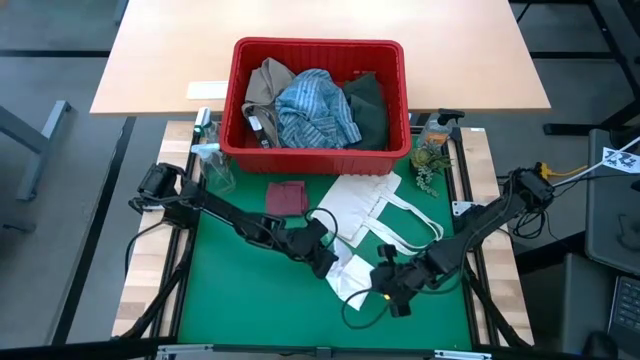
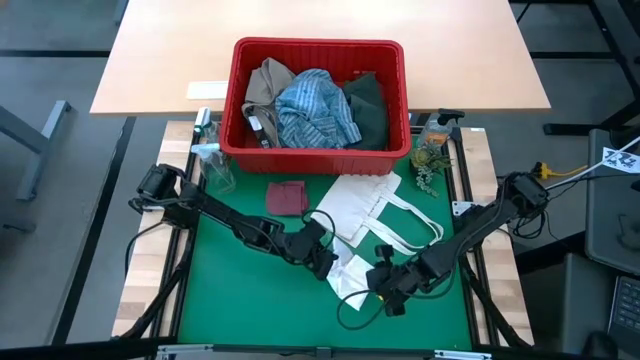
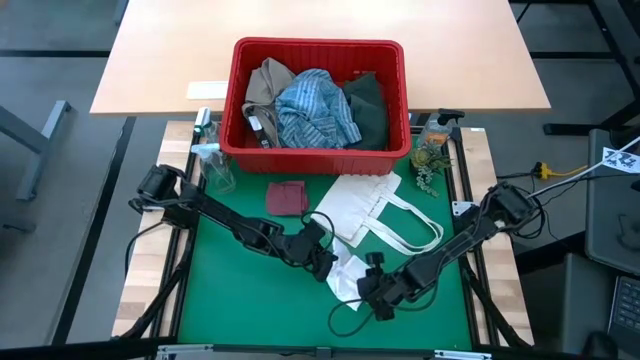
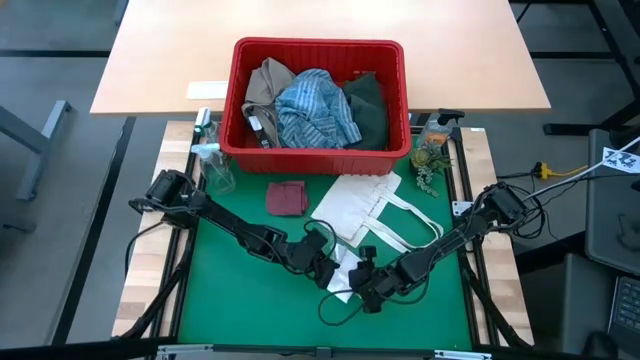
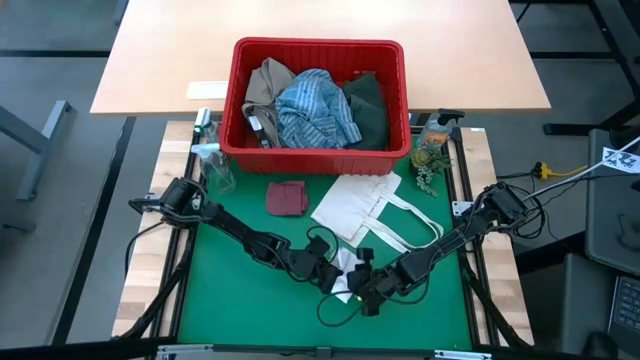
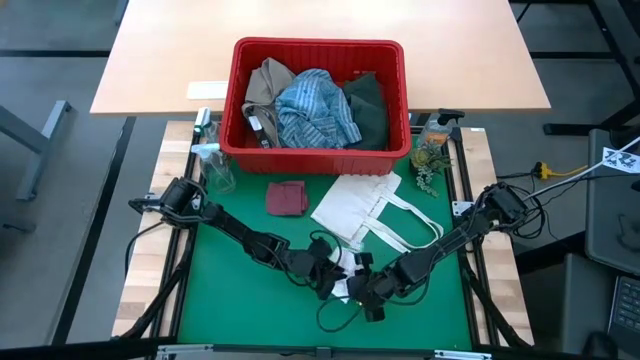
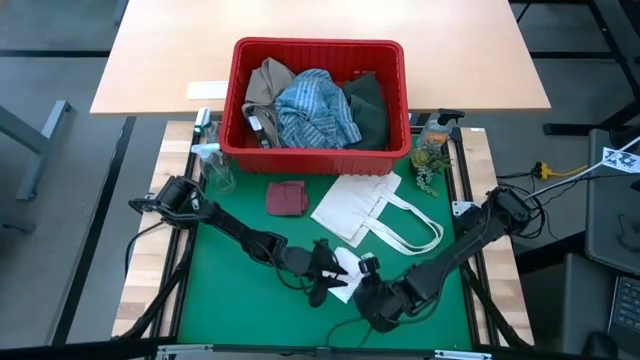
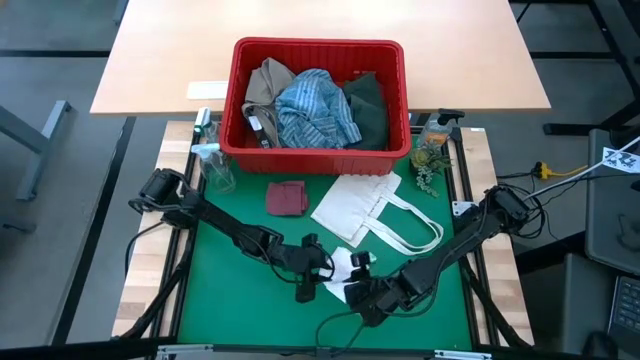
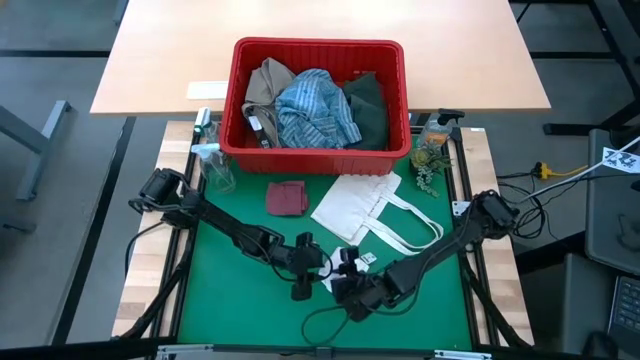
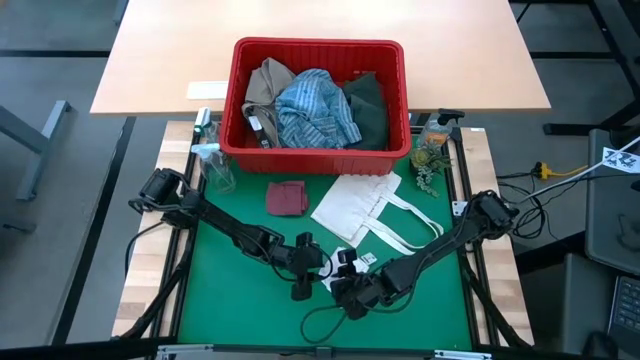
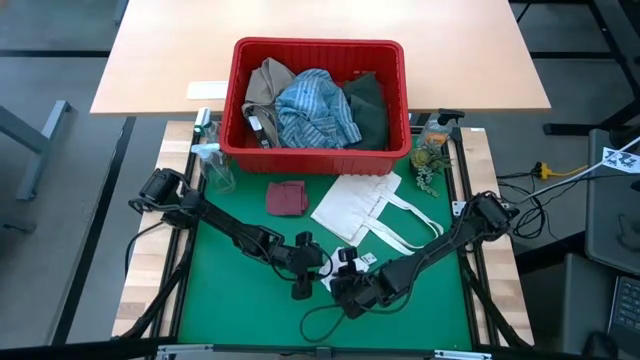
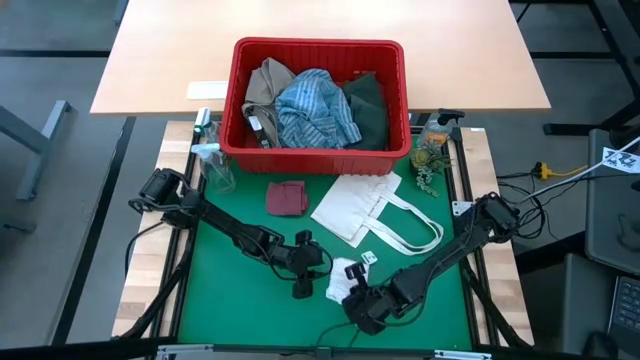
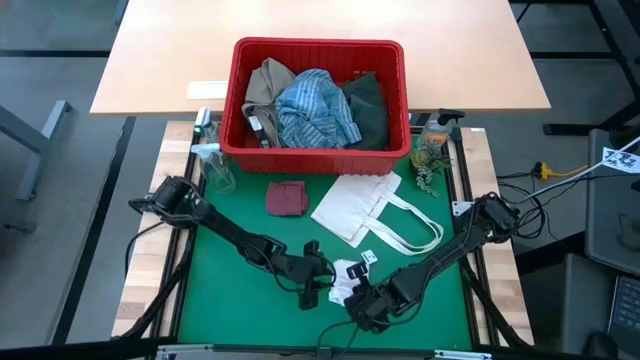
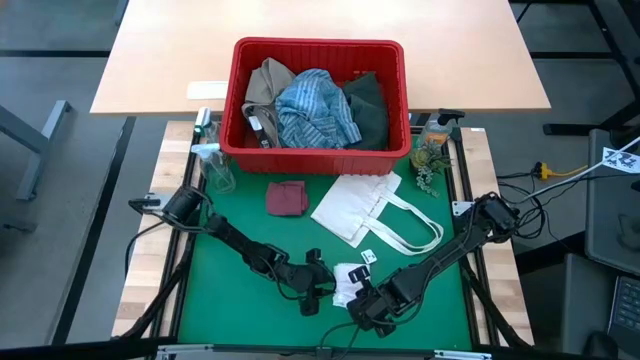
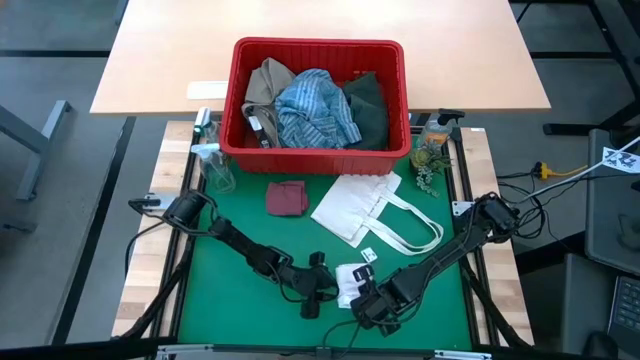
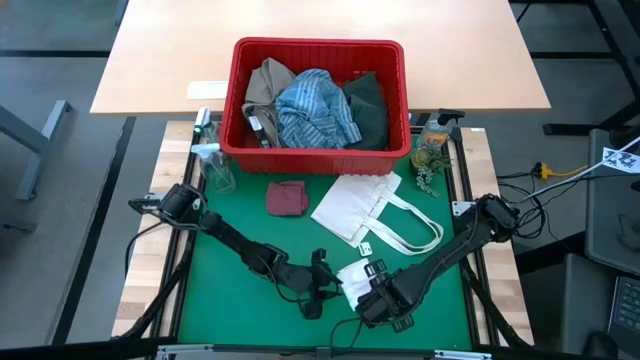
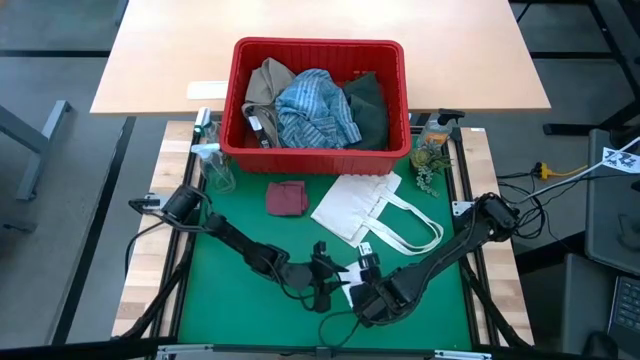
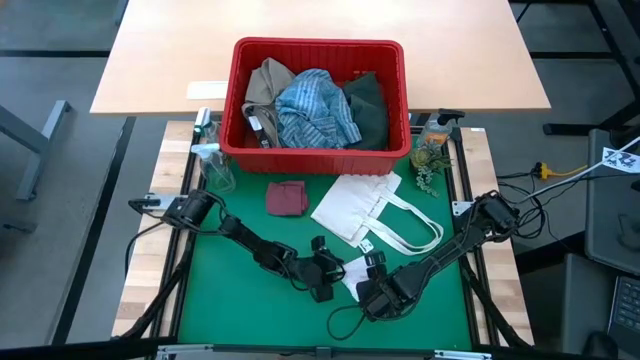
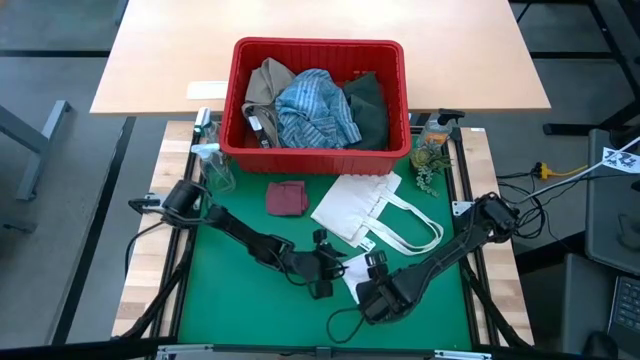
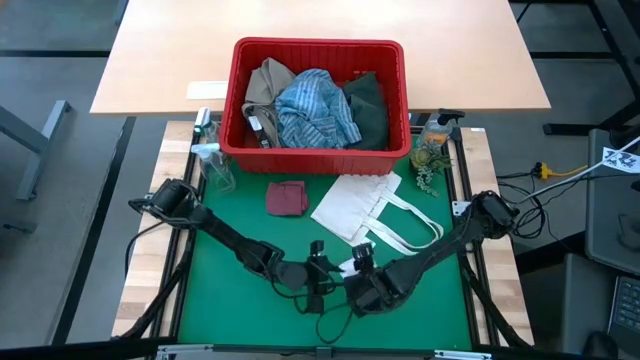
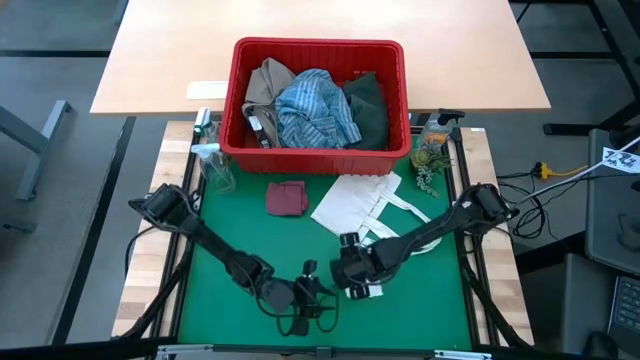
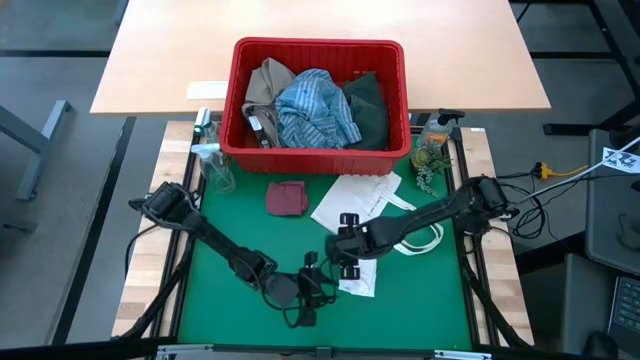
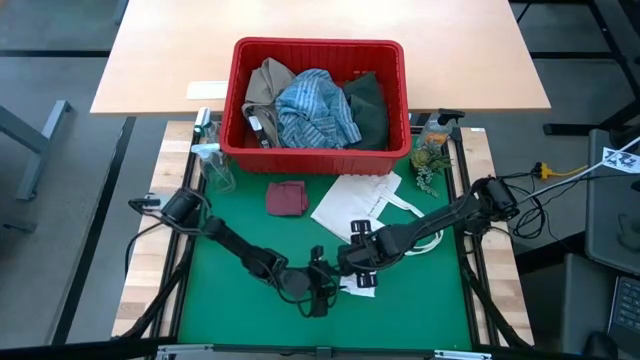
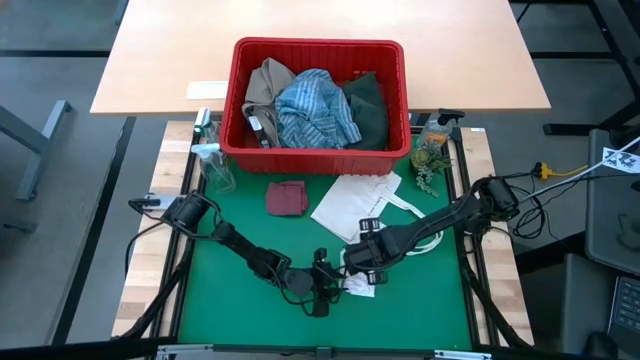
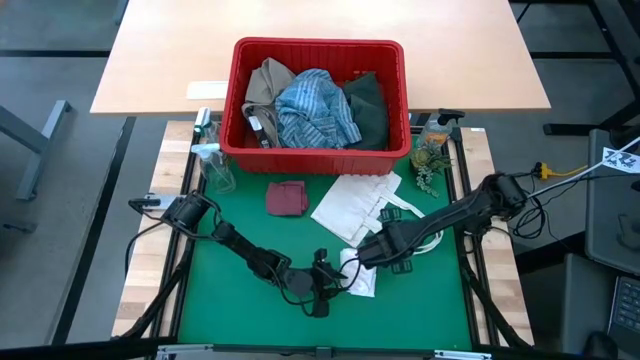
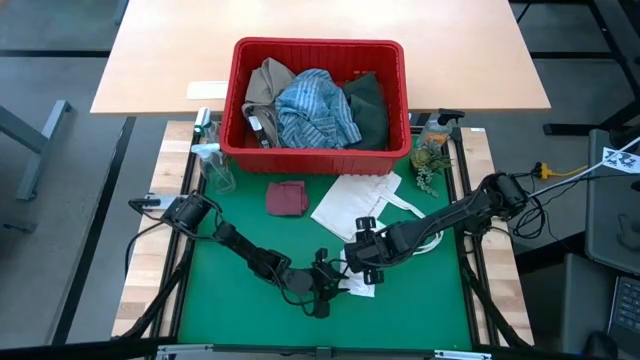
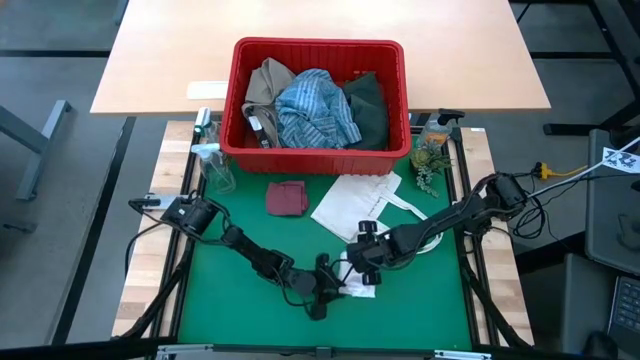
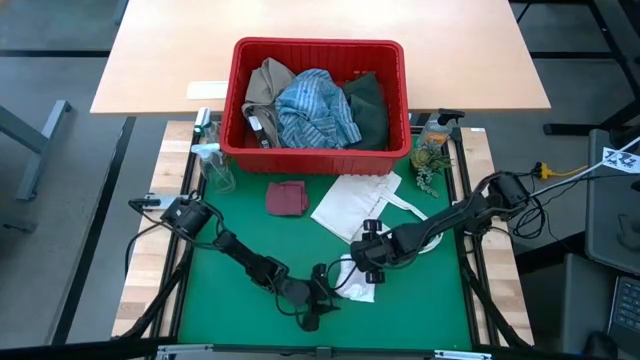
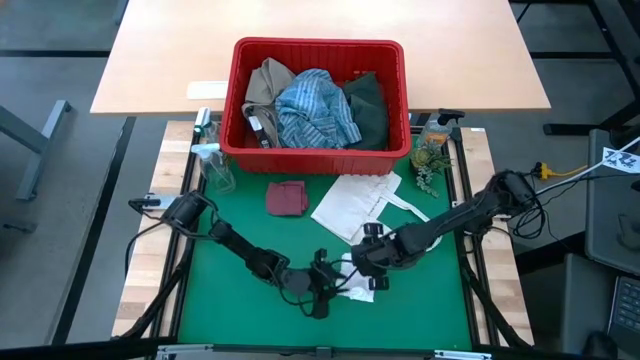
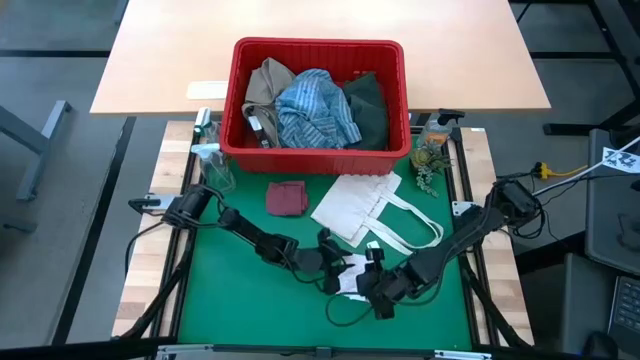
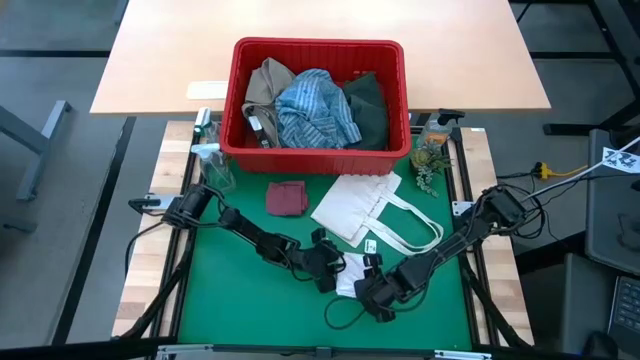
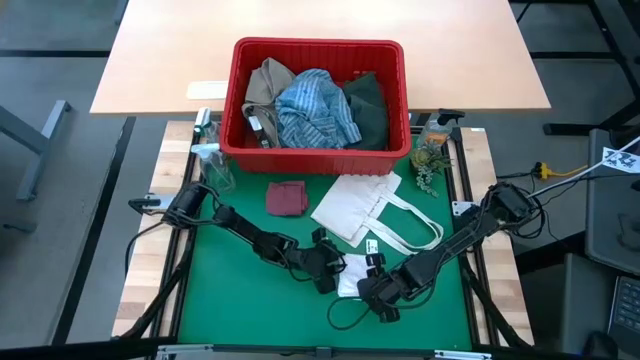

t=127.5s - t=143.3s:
Task: Fold Laundry from Bin
Fold the white underwear

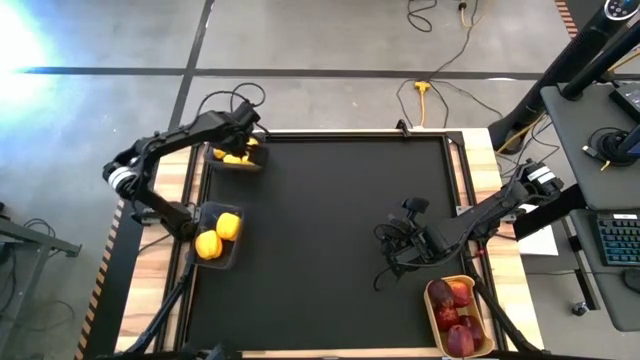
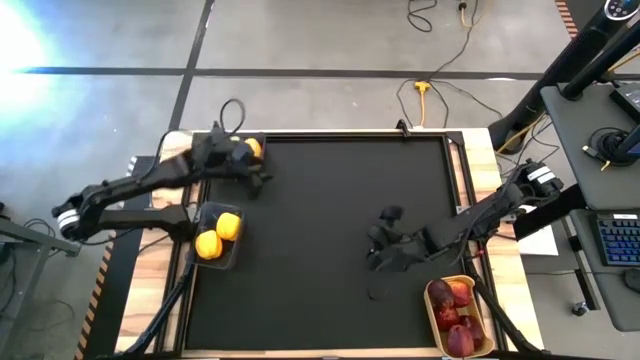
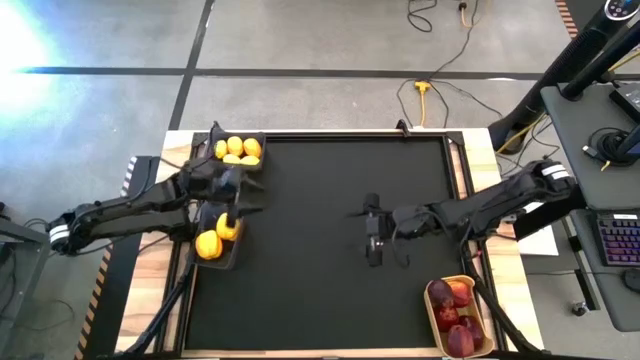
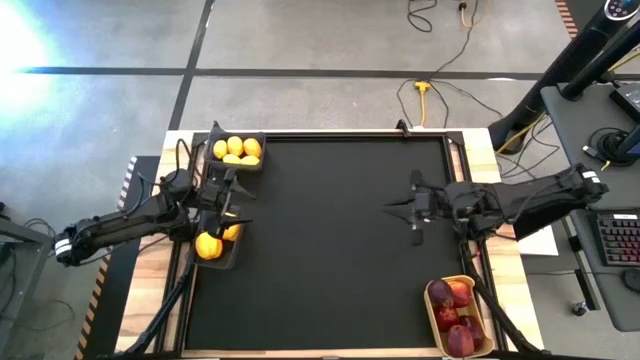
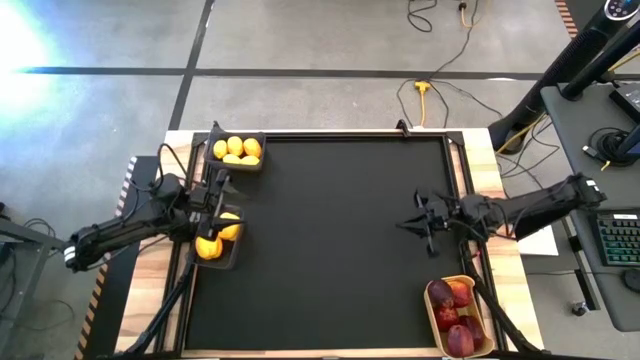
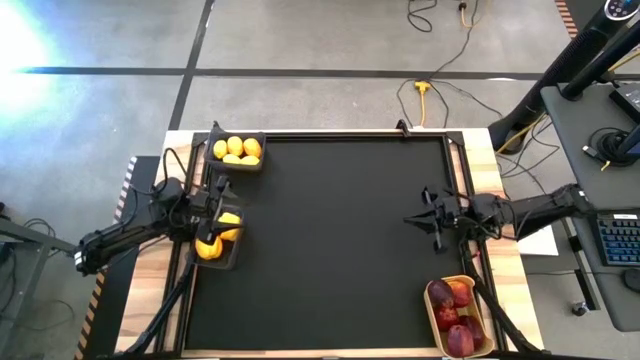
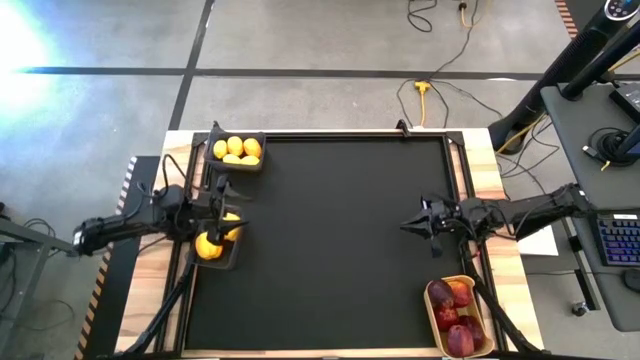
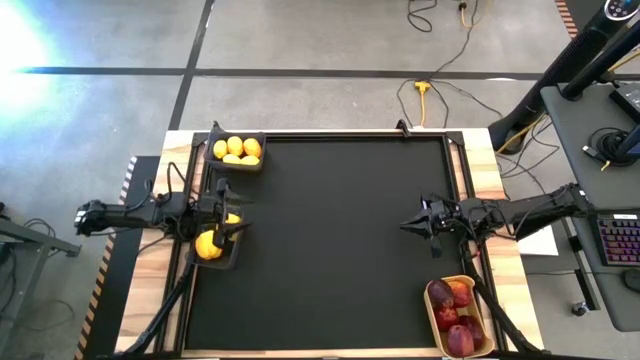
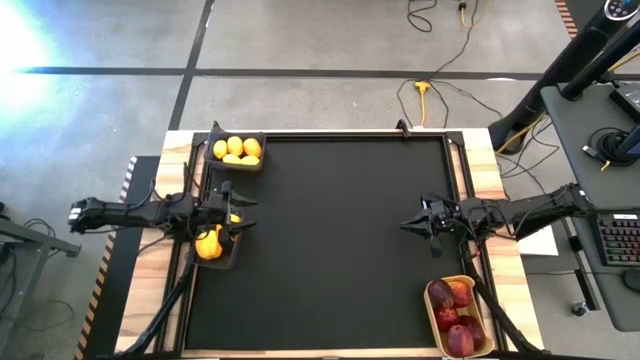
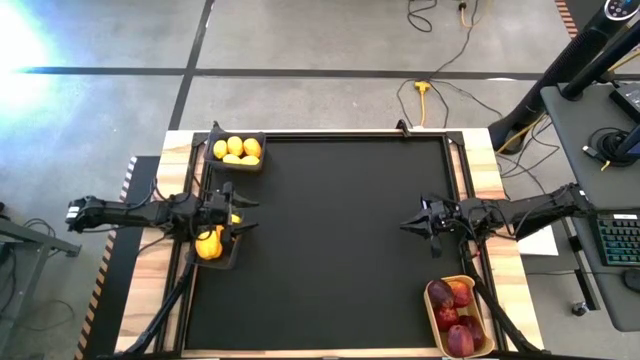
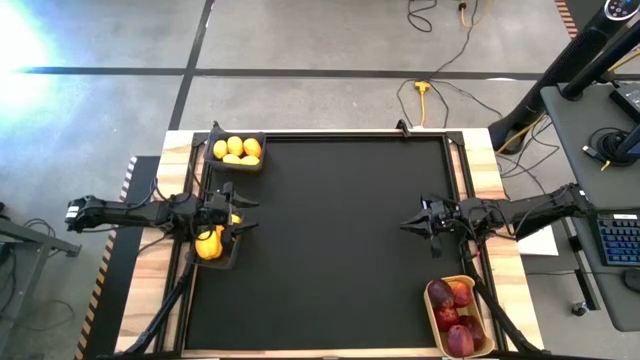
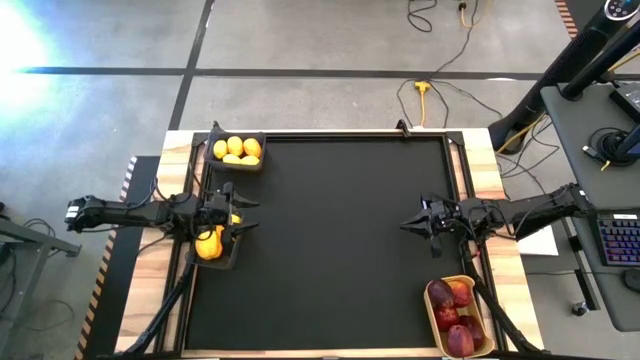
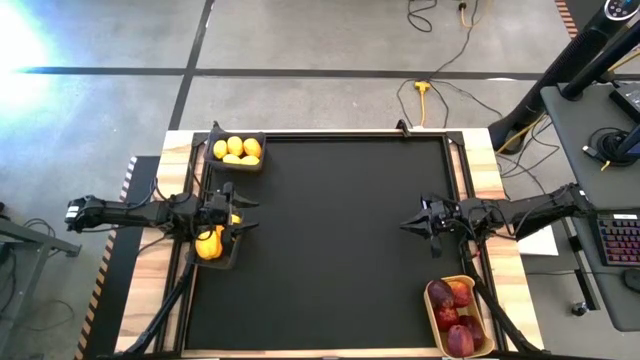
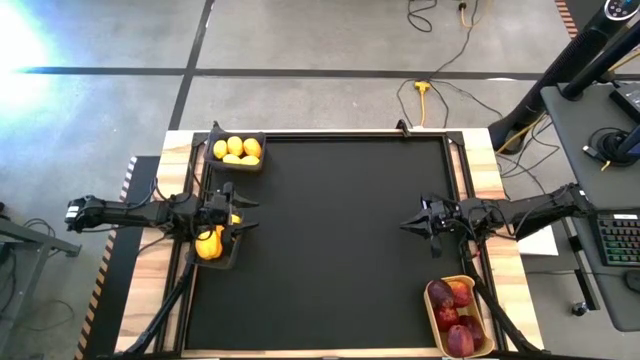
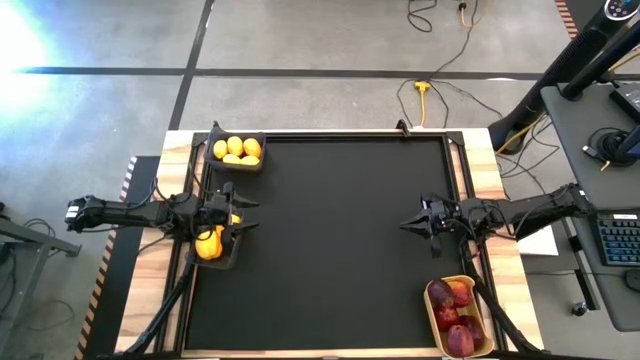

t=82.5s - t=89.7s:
Task: Sort produce into baskets
Return to Home Position
